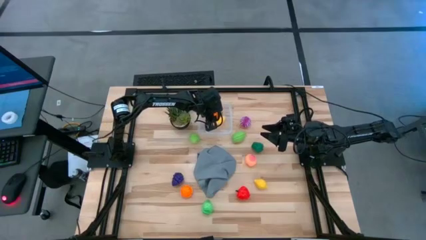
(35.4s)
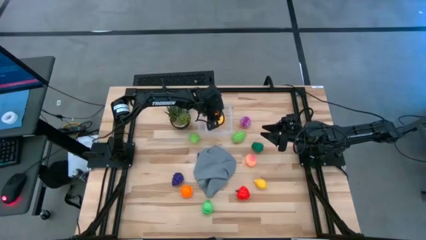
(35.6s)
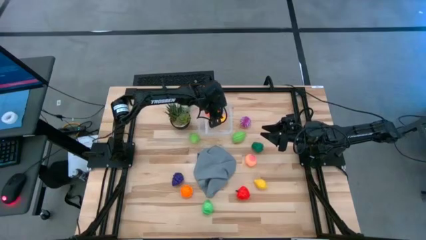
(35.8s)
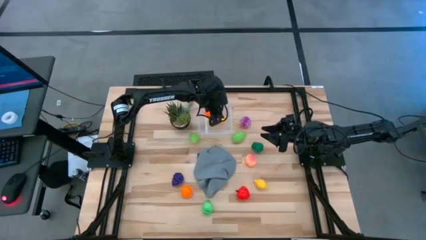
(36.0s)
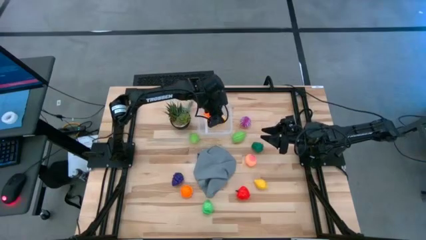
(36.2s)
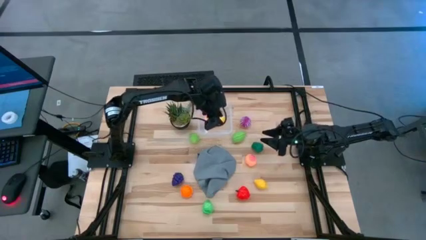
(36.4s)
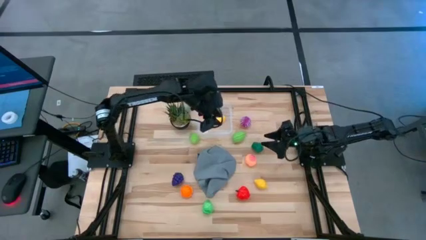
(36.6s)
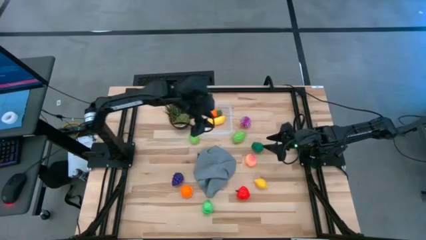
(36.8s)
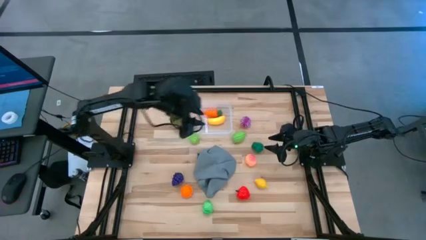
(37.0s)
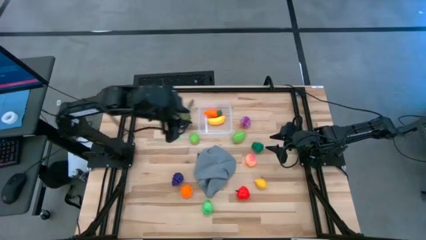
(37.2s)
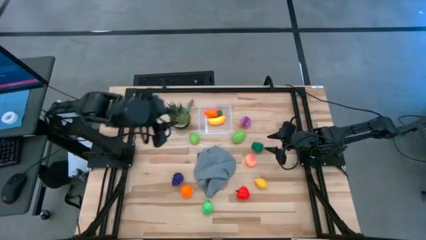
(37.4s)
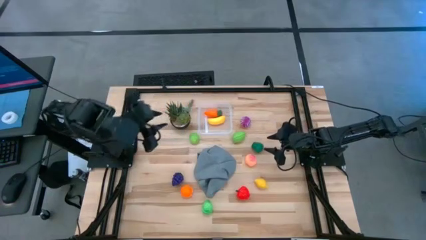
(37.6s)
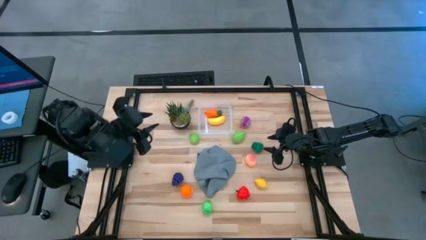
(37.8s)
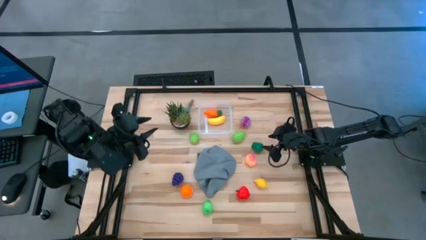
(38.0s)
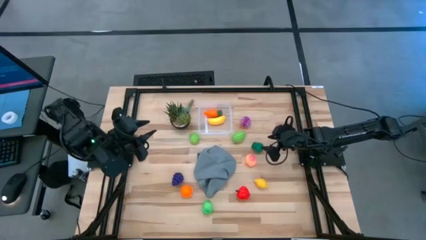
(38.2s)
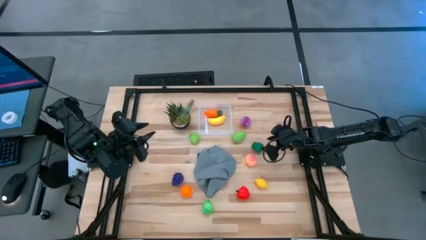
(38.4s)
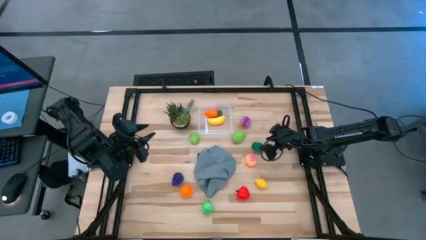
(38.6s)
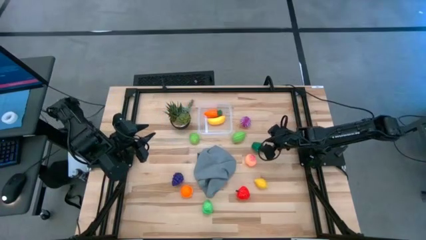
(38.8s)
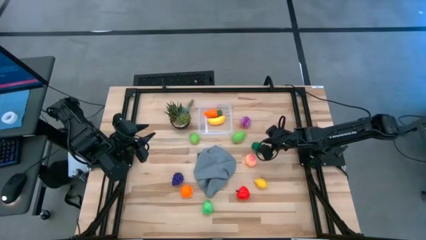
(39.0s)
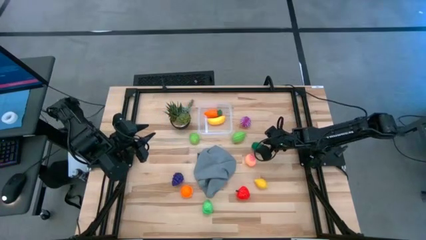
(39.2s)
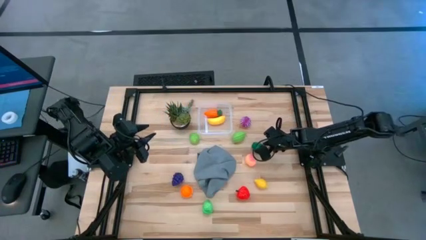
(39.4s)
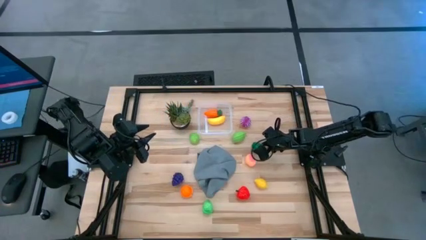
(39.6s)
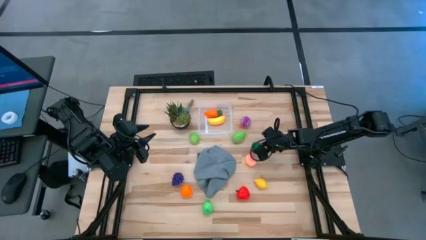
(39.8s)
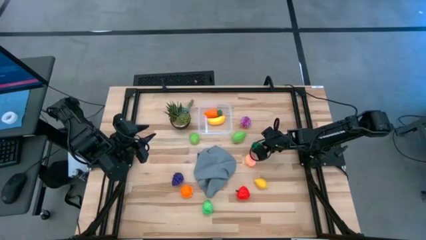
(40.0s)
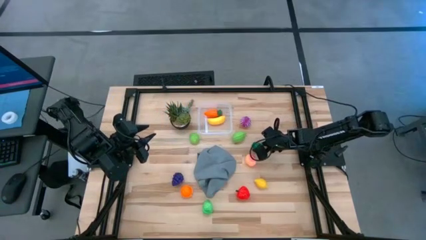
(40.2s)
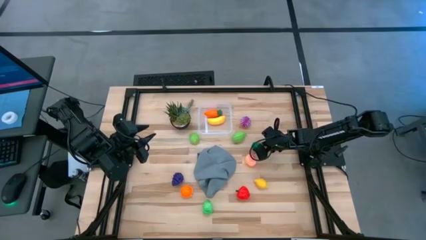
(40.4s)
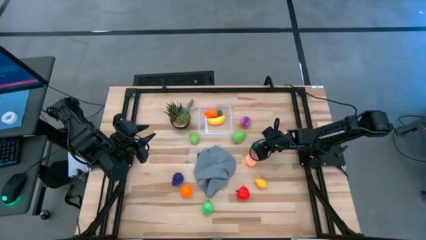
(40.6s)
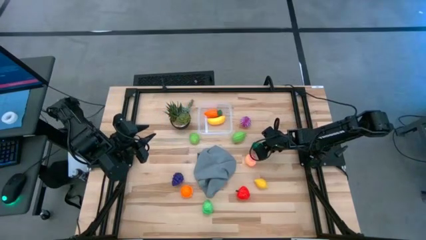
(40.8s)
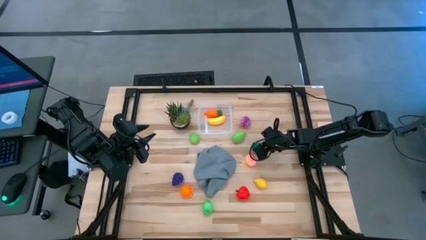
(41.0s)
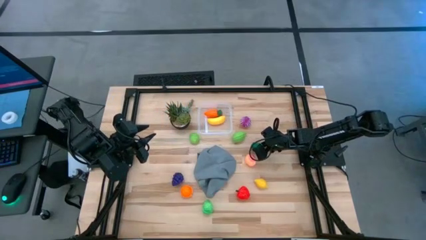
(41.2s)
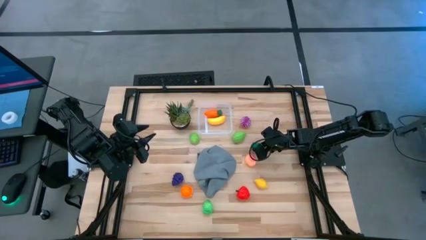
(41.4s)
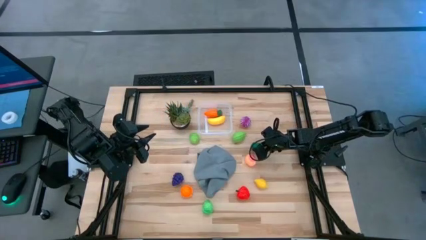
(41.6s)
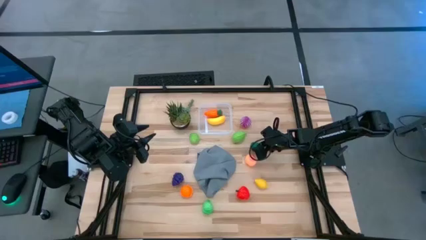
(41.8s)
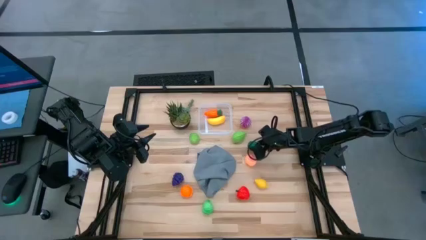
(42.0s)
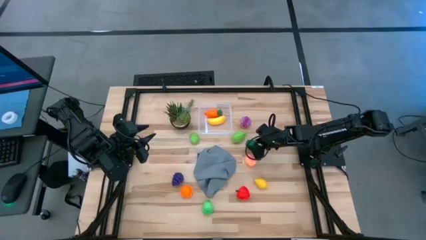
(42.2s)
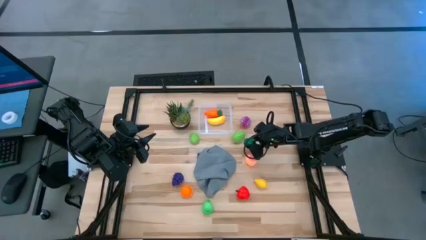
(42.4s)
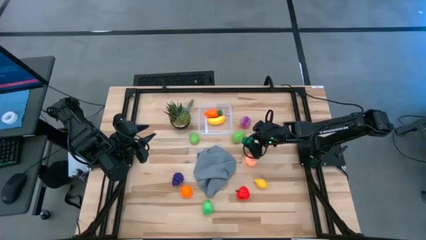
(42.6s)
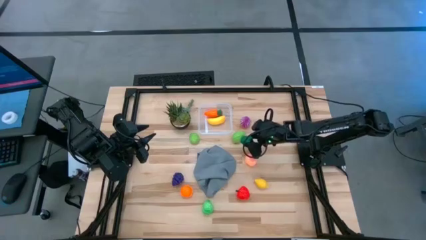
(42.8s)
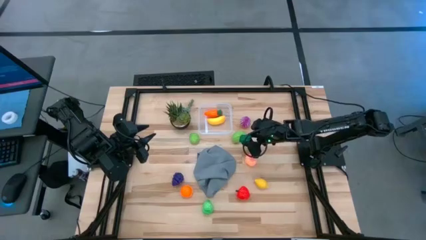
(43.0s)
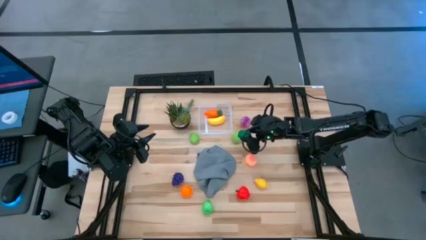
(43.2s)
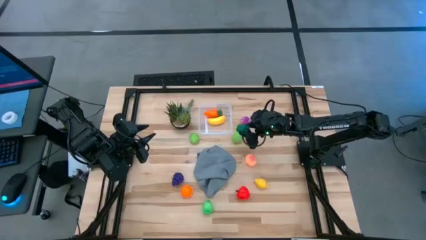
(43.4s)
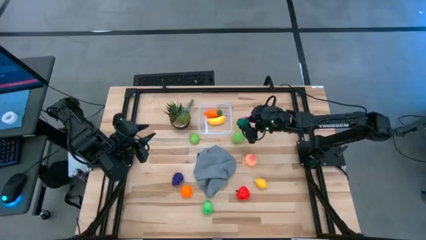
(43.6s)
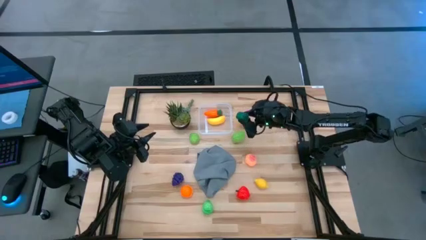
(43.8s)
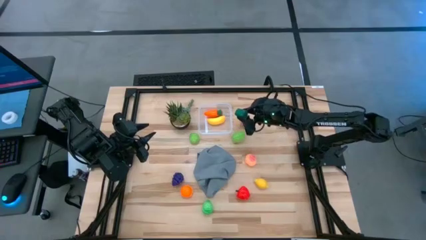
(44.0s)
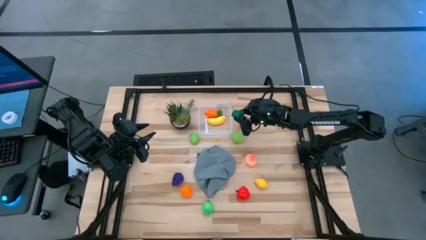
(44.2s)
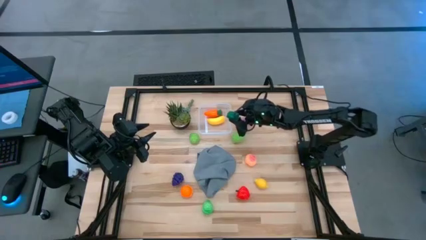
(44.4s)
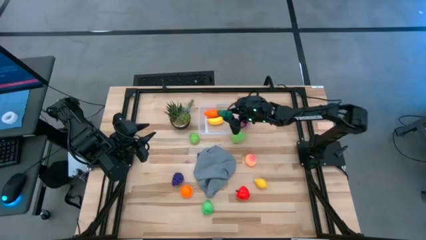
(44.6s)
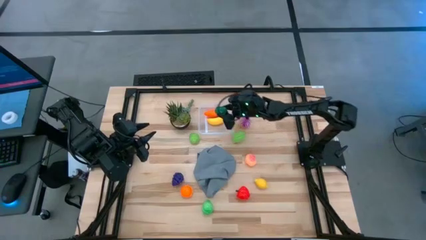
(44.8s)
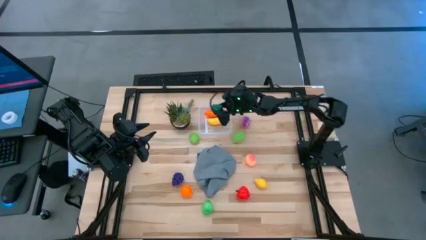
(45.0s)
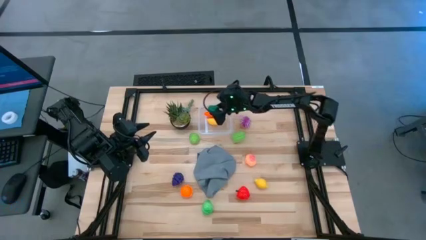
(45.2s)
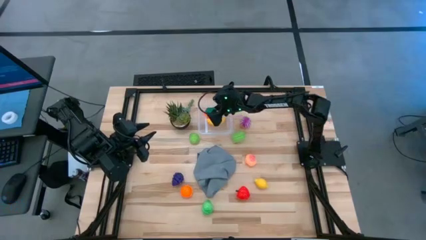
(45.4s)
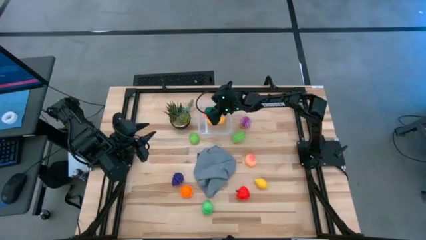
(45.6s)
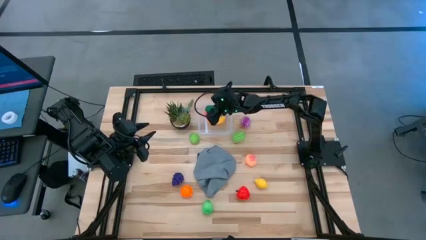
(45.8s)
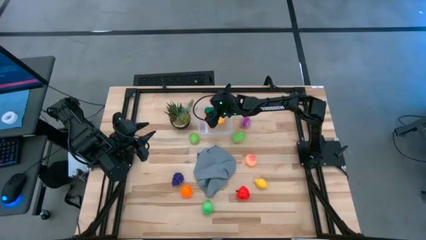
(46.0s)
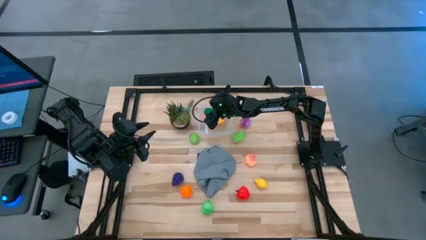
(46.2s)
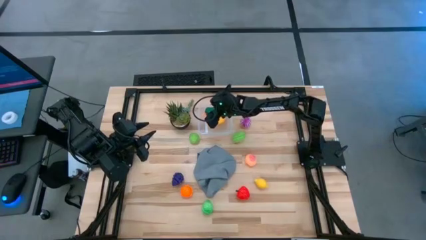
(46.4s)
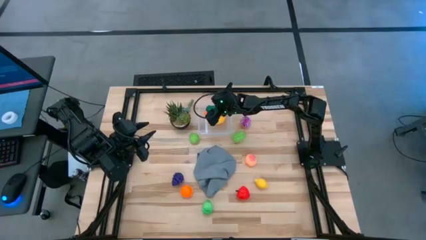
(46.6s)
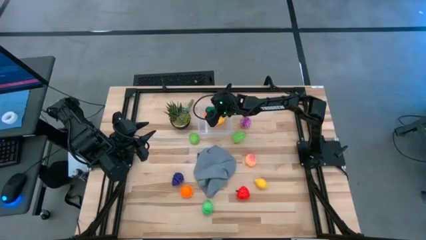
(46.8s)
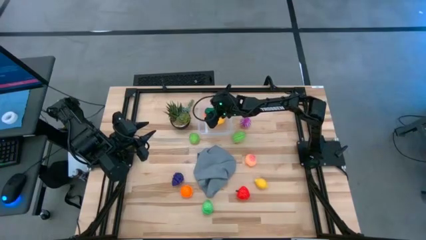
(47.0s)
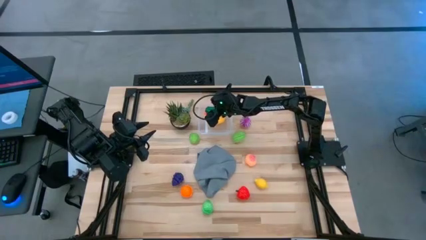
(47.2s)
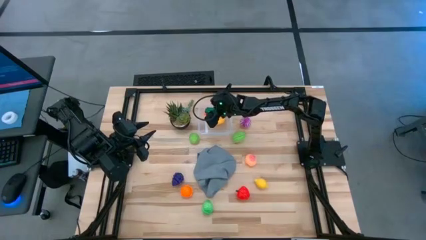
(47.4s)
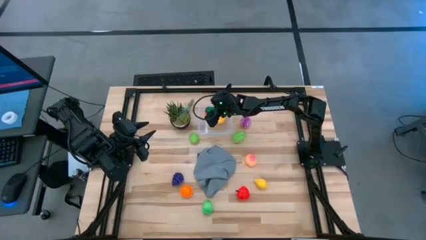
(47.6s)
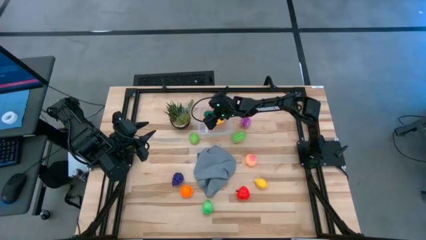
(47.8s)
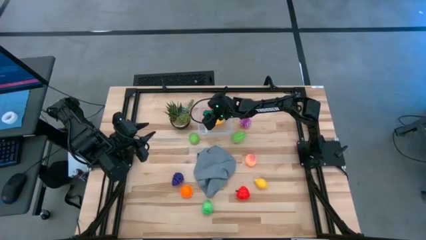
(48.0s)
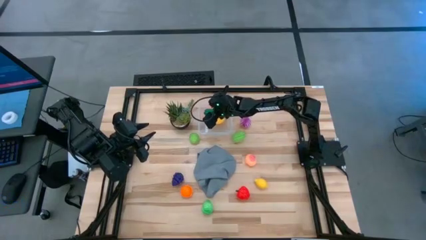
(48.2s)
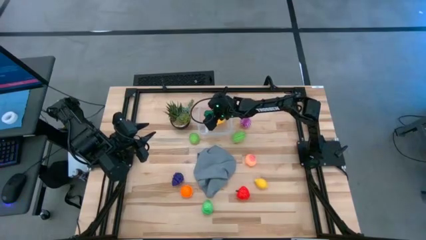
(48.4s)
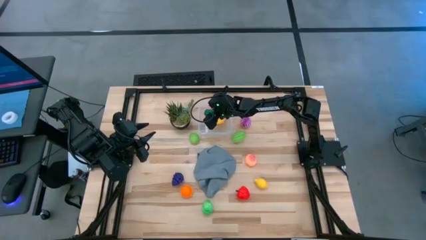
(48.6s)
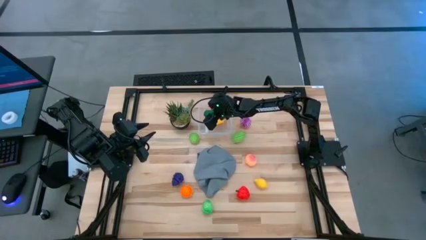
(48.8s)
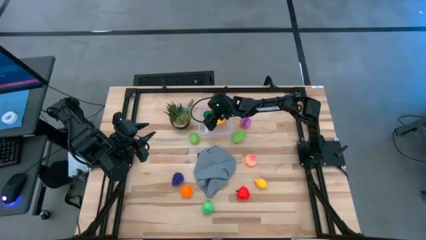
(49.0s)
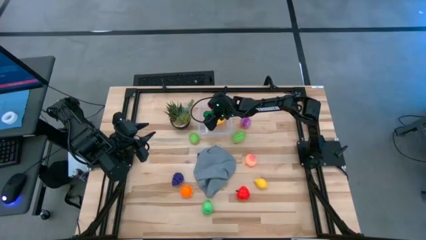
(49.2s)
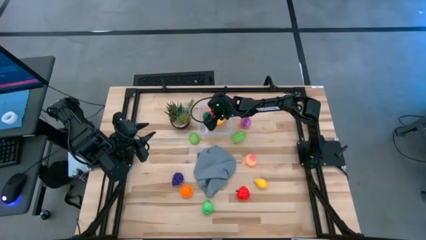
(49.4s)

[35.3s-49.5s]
Task: Pick and placing Produce into tupperware
Put the green bell pepper into the transparent container

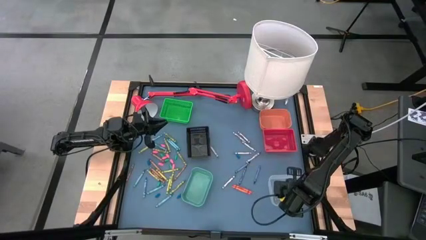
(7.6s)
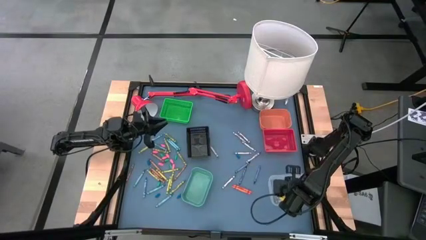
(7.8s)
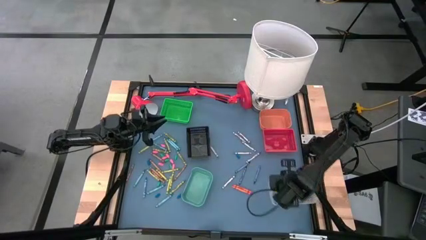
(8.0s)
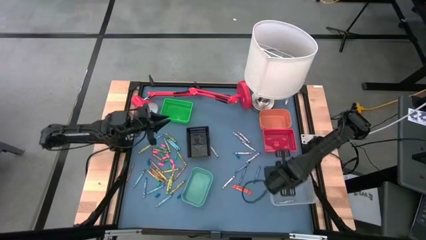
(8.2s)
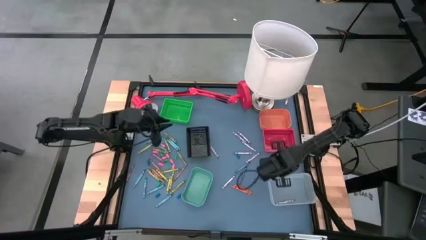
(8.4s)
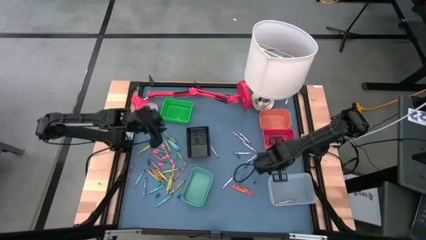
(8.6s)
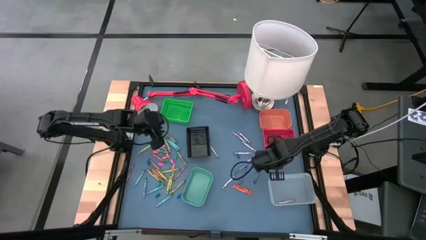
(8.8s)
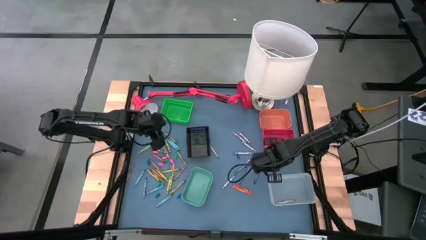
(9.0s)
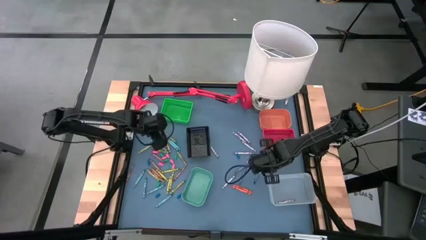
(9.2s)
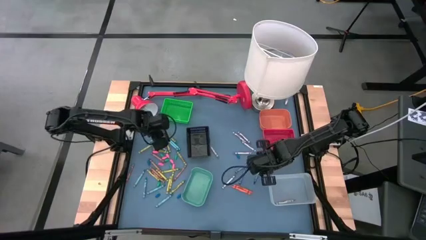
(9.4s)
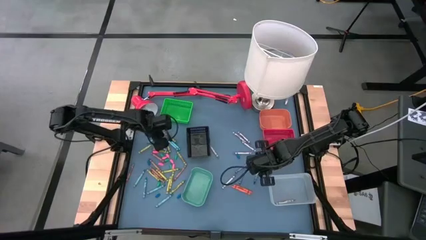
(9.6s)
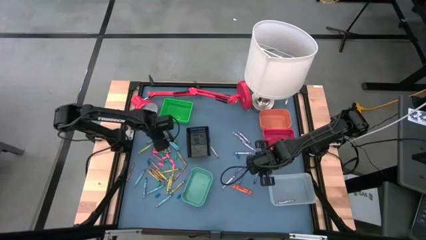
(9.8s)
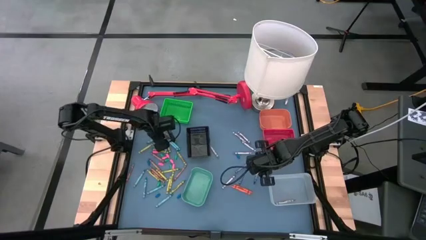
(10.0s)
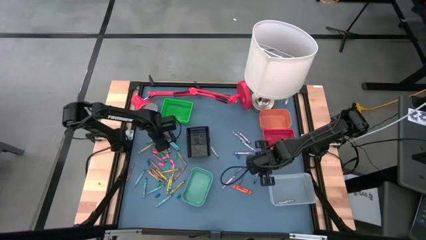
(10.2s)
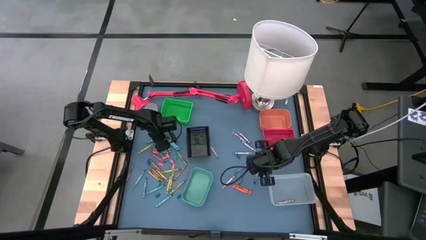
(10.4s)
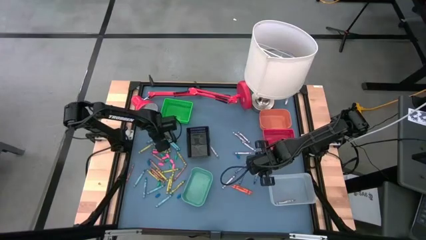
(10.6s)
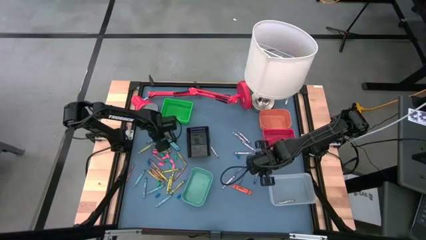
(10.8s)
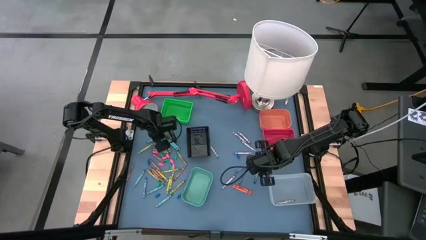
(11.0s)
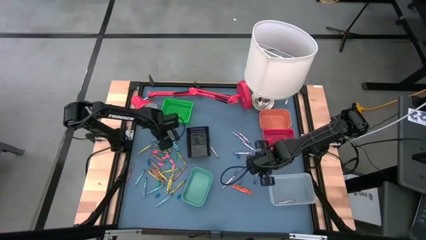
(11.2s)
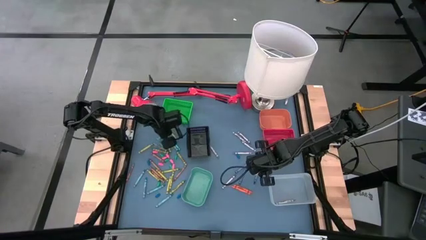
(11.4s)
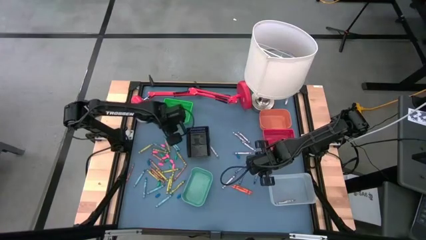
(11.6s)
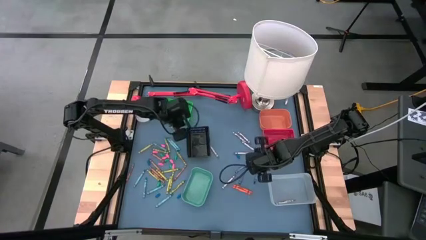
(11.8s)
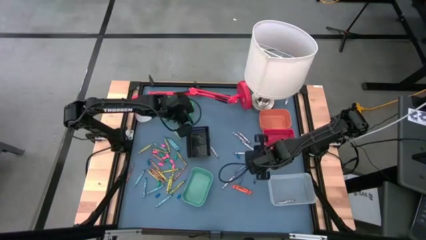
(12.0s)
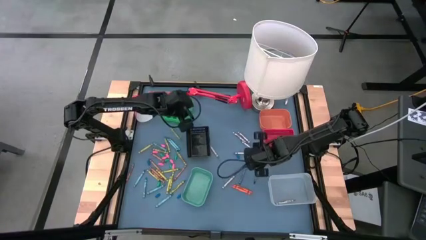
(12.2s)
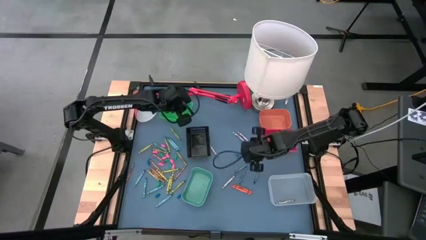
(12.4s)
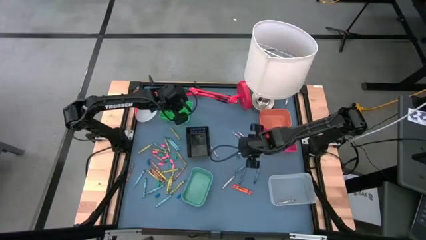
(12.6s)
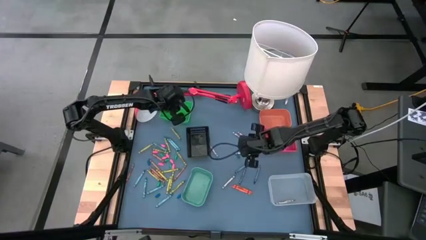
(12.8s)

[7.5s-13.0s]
Task: Sort crayons
Put the blue green crayon into the green bin
